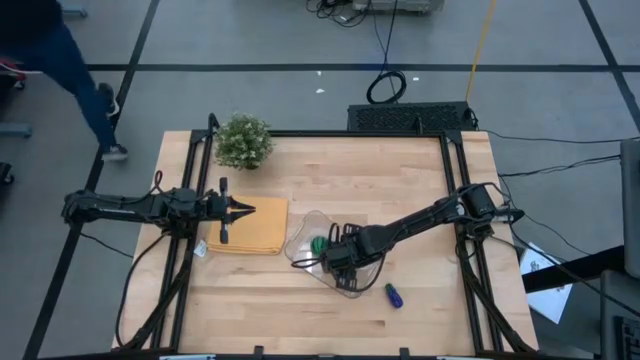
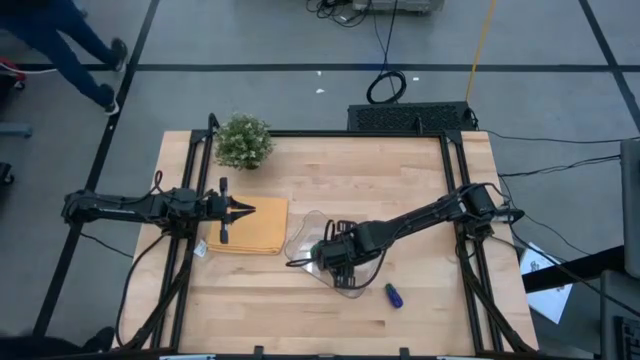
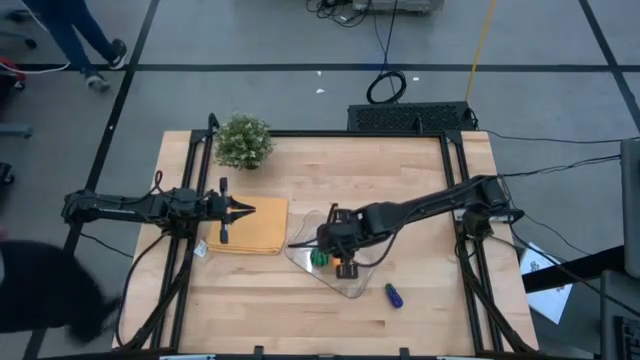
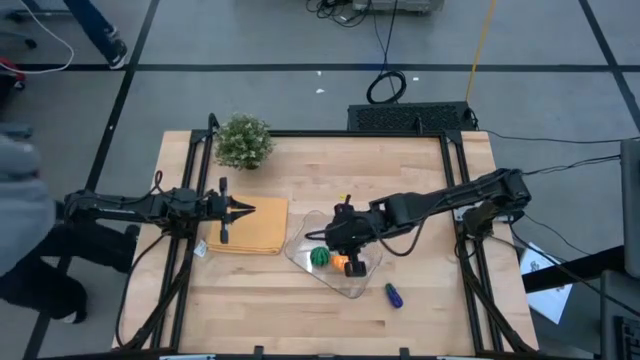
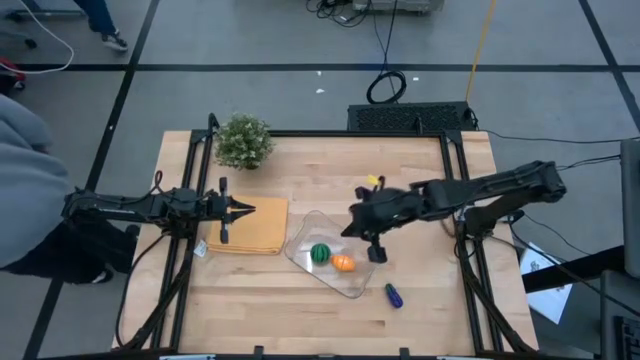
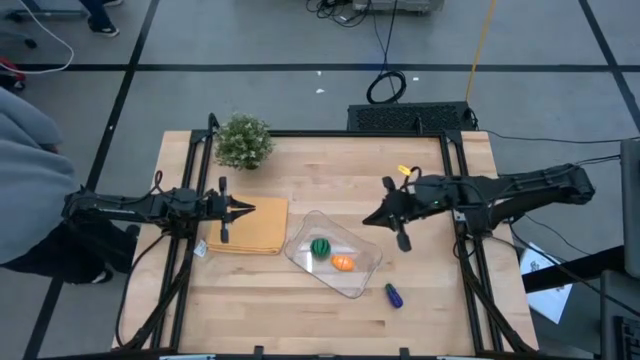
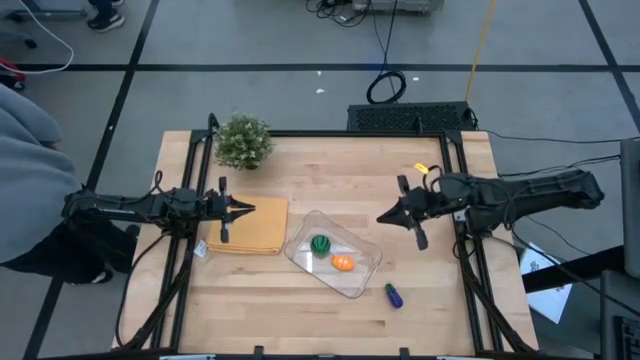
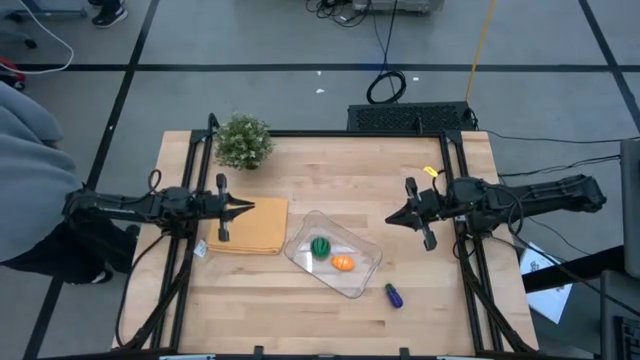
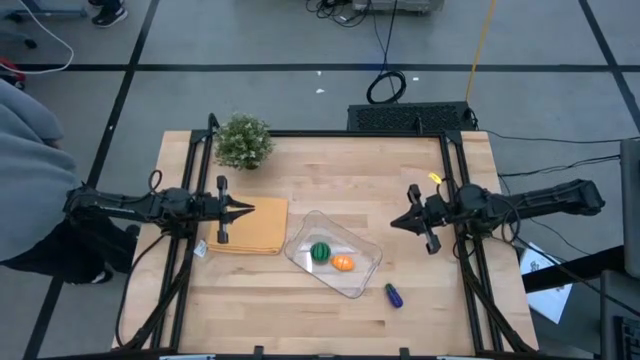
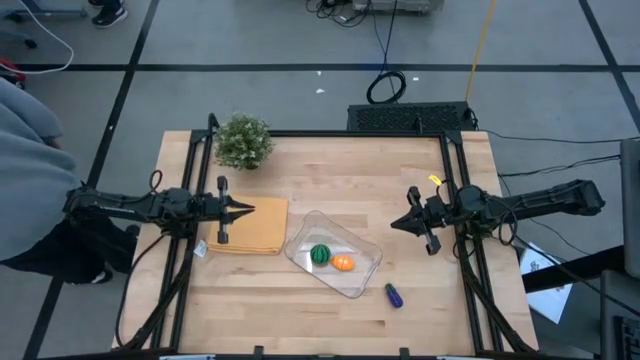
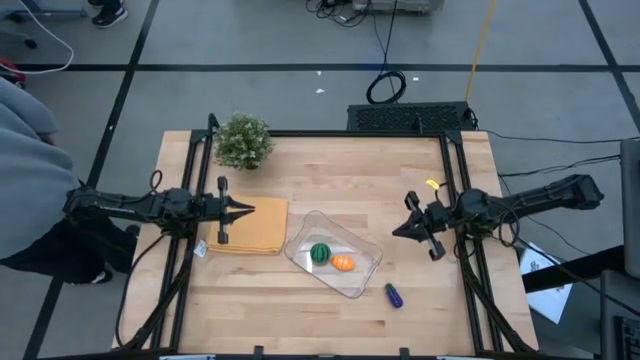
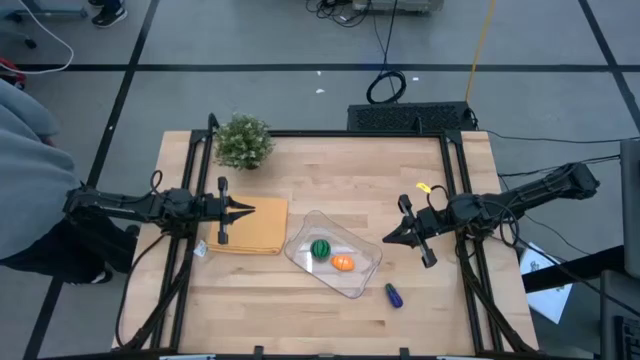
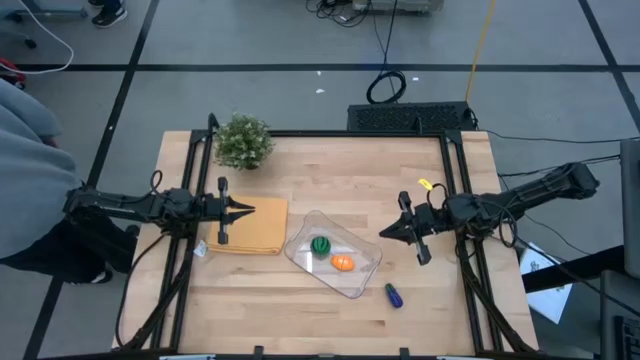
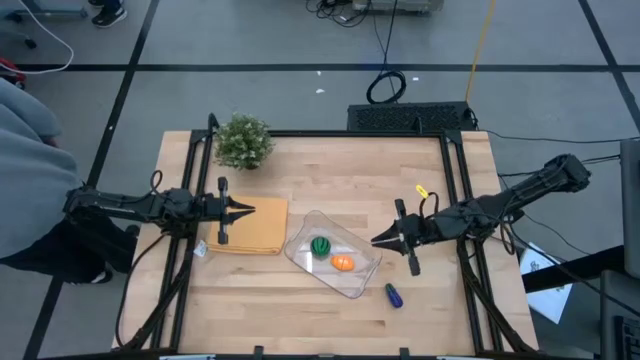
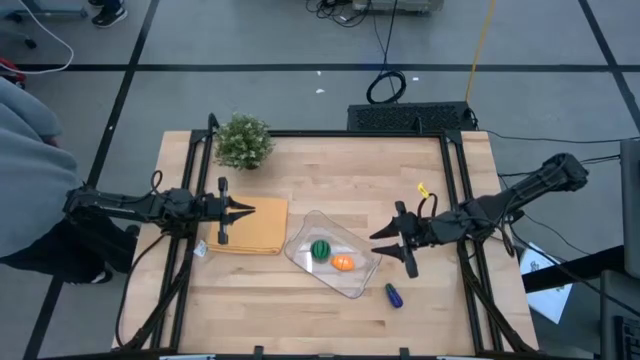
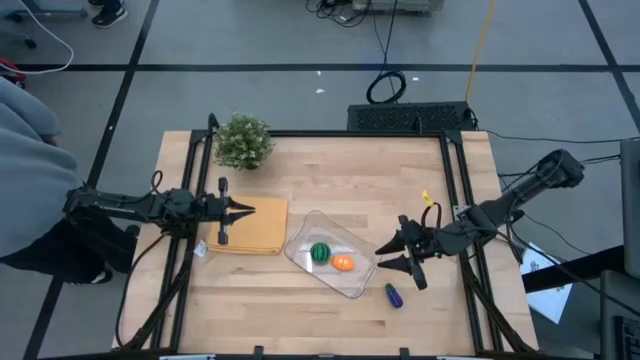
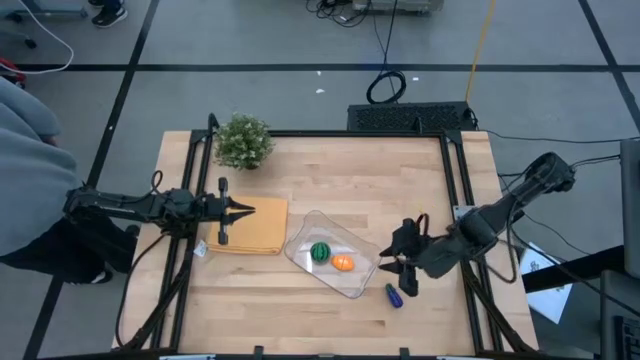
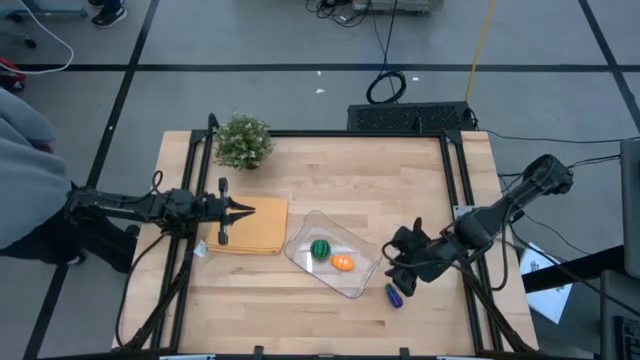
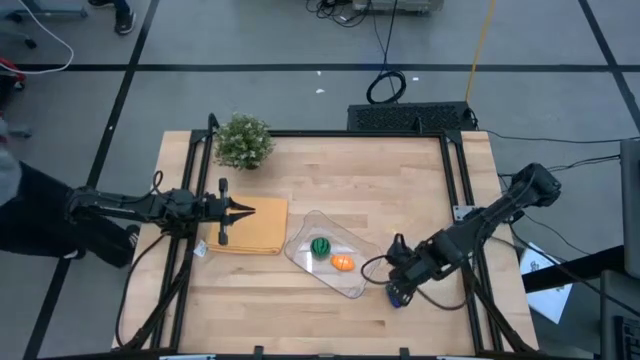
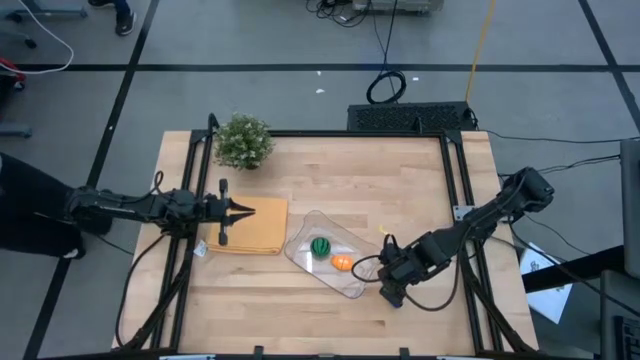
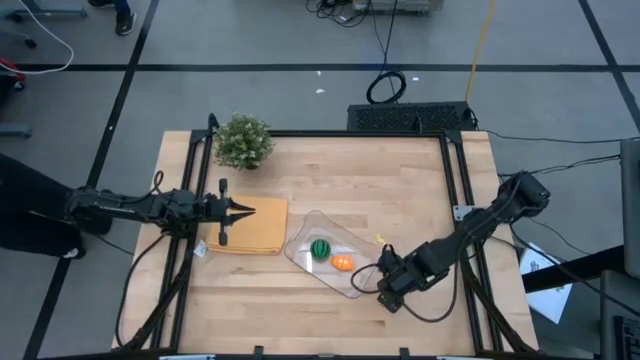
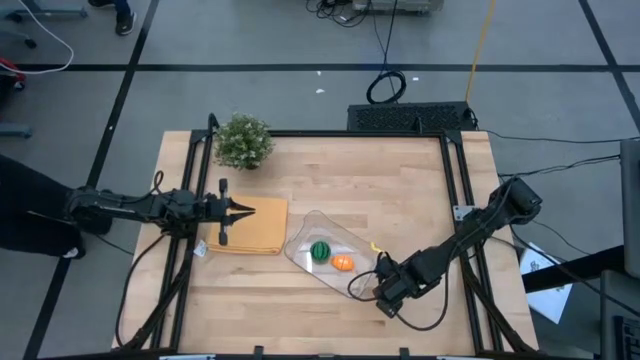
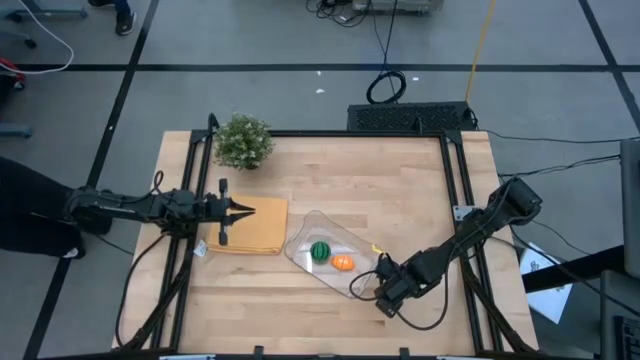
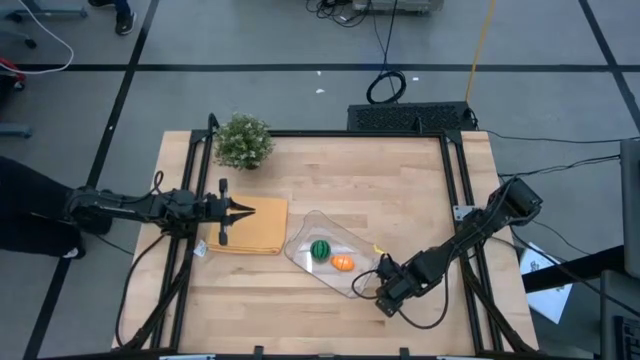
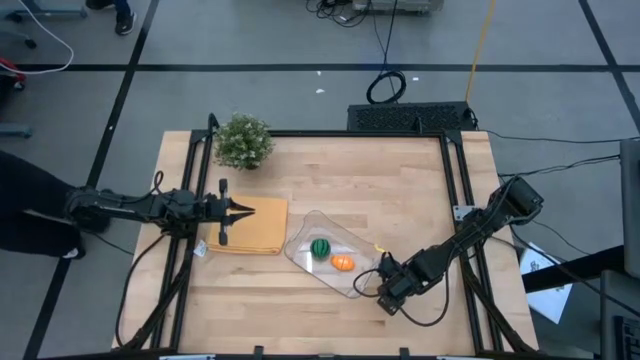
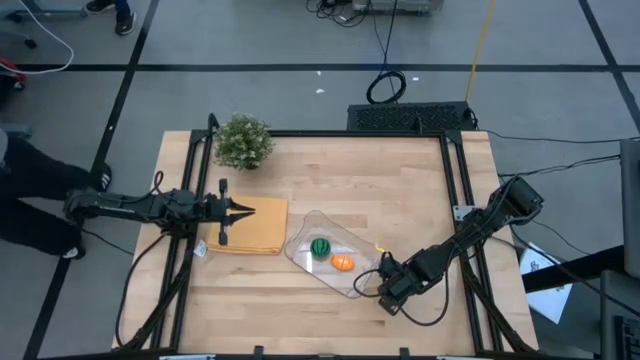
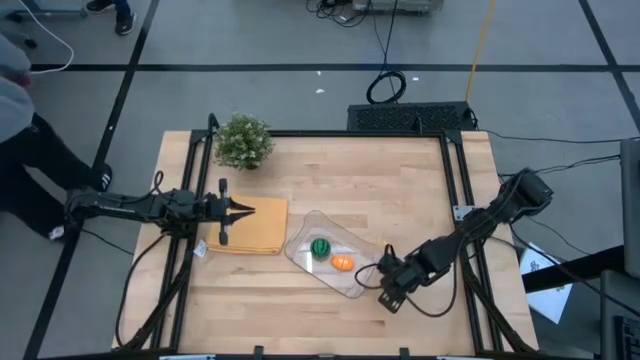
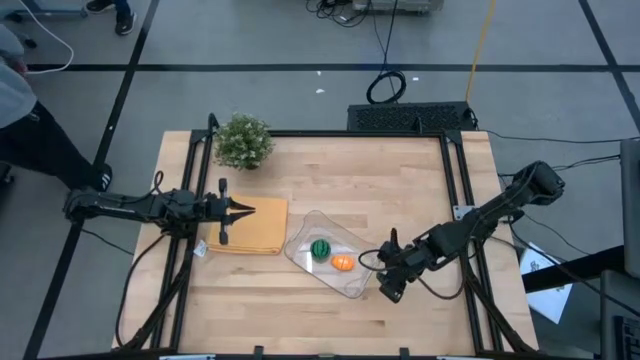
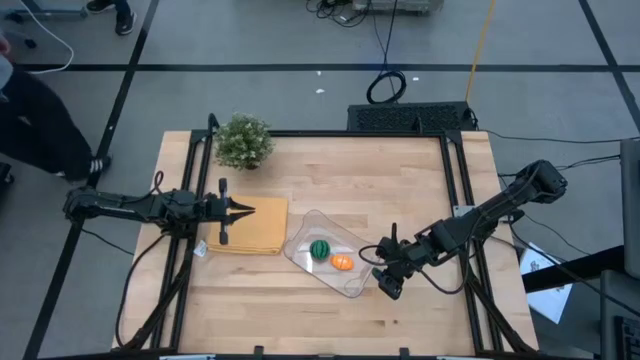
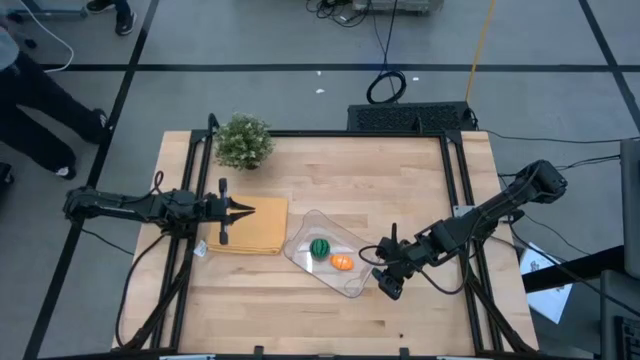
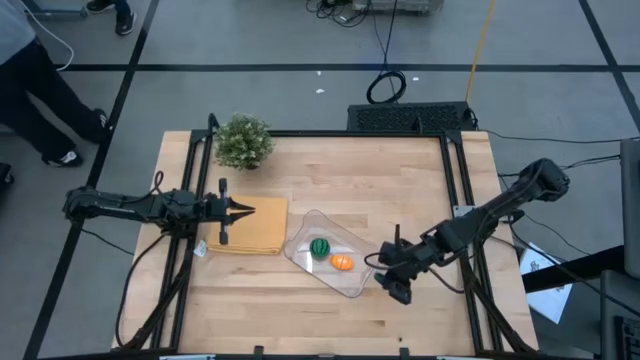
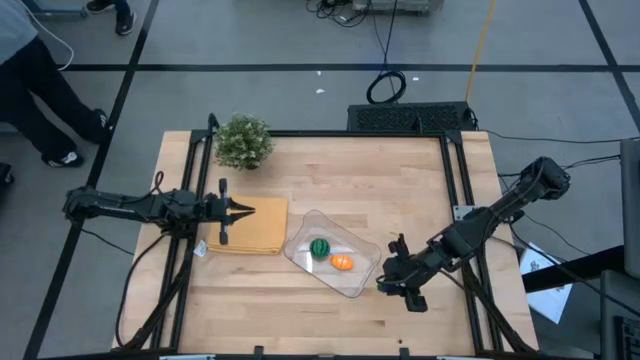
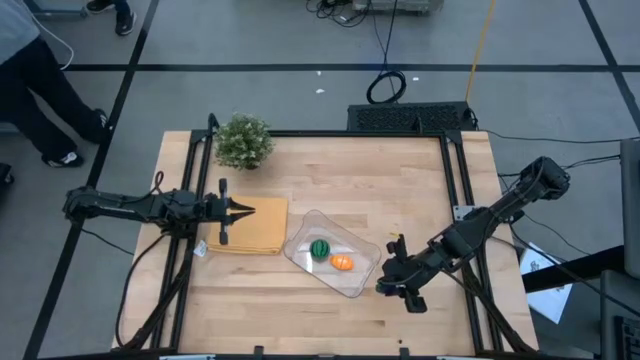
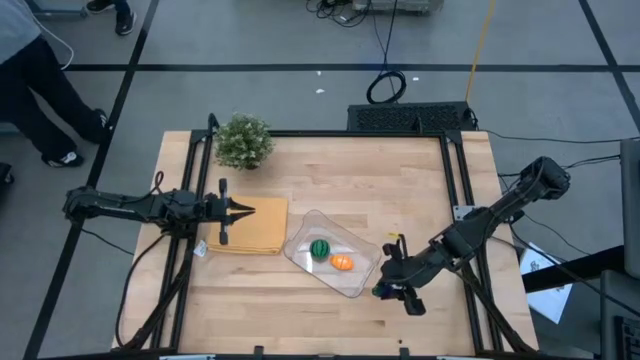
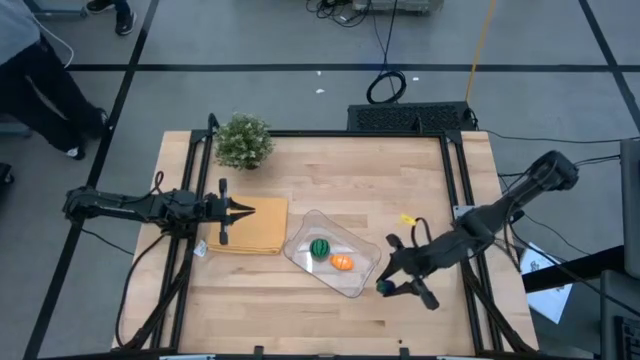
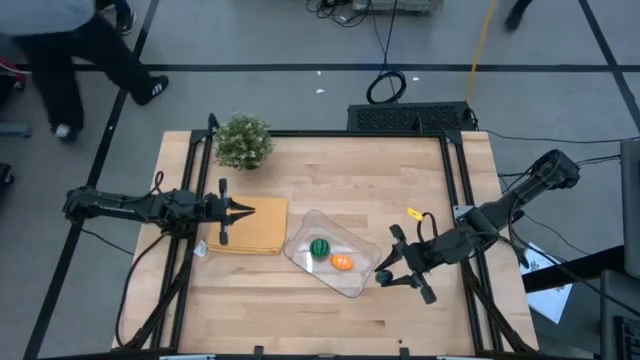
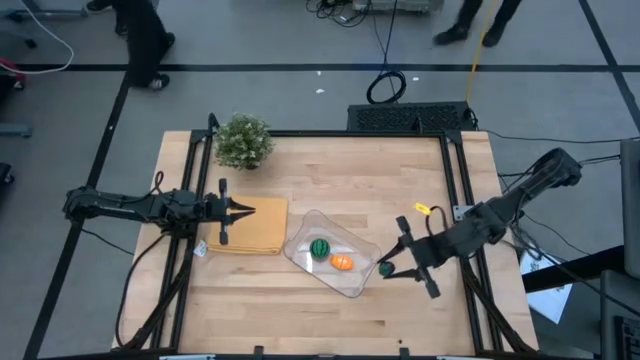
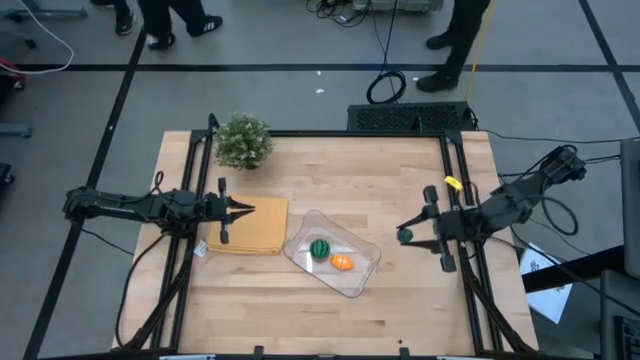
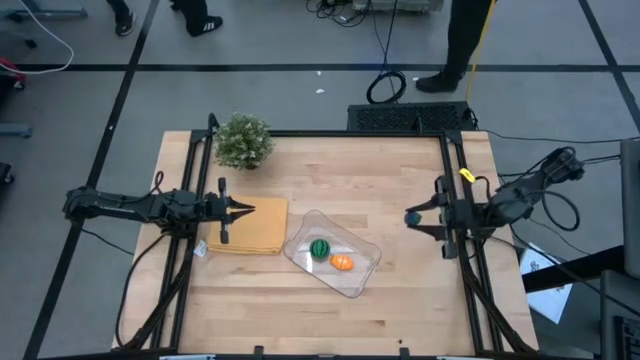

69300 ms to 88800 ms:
Task: Pick and placing Produce into tupperware
Put the purple eggplant into the transparent bin

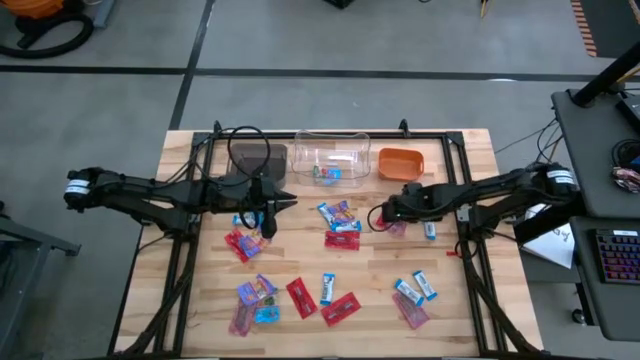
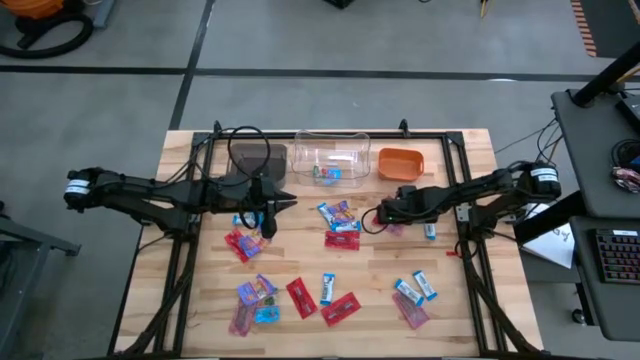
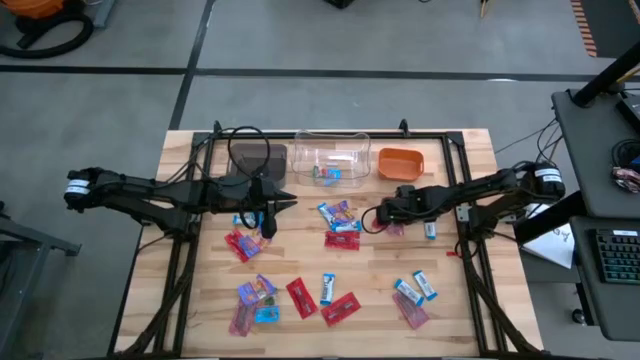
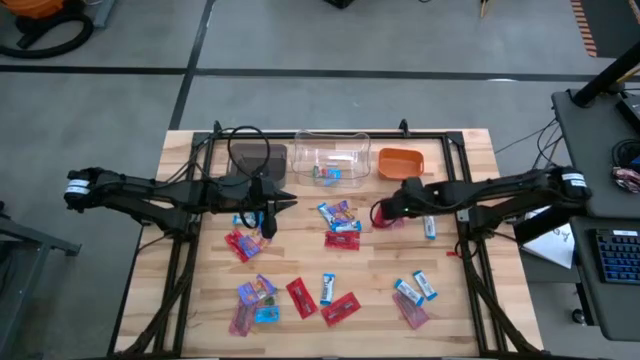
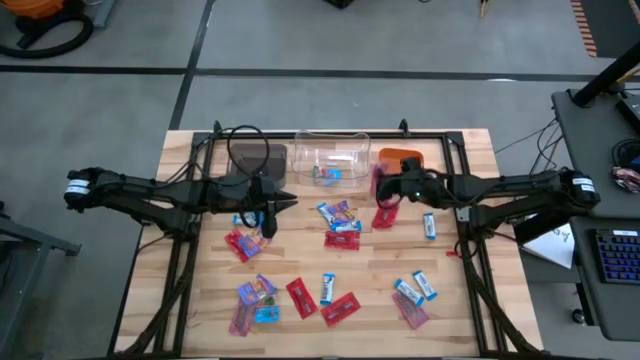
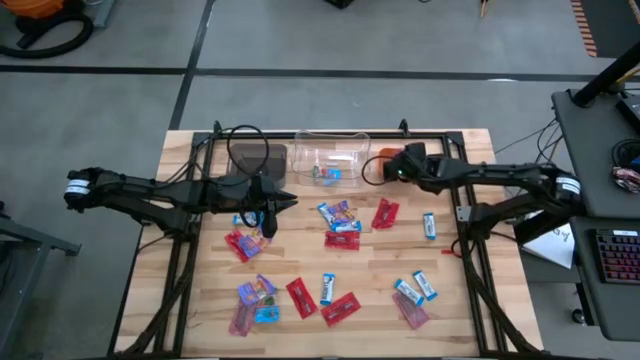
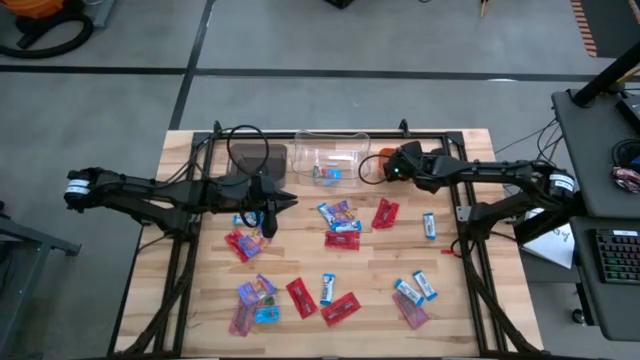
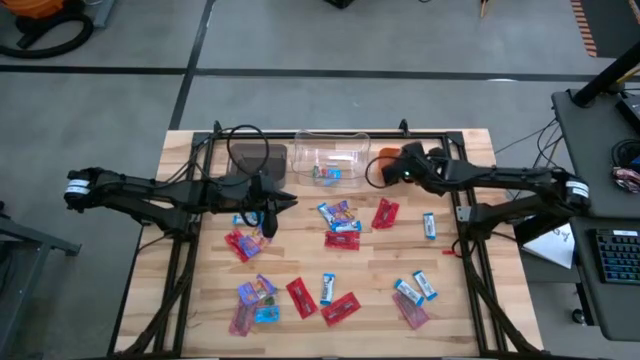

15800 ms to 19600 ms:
Task: Sort candy
Put the red candy into the orange bin
